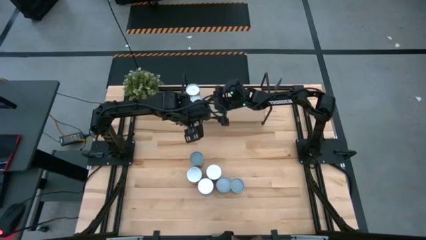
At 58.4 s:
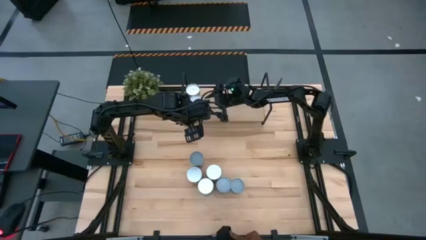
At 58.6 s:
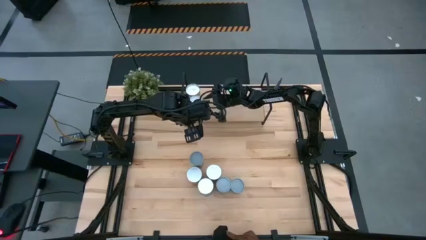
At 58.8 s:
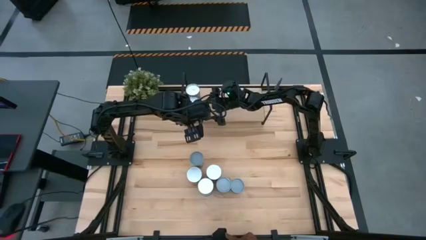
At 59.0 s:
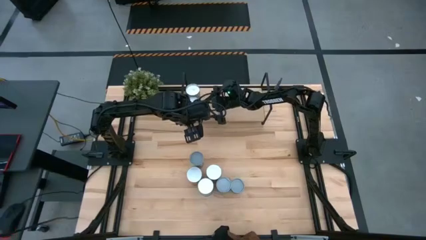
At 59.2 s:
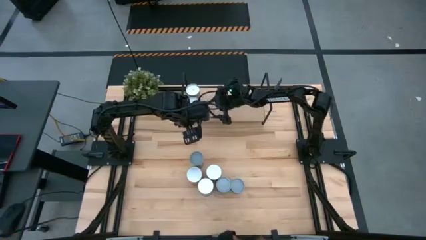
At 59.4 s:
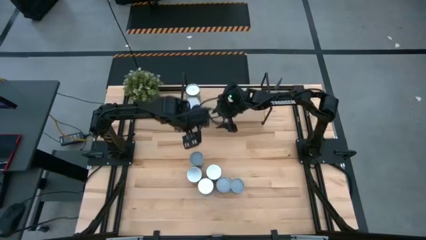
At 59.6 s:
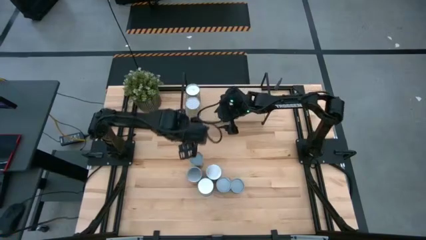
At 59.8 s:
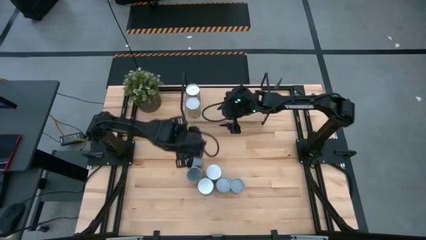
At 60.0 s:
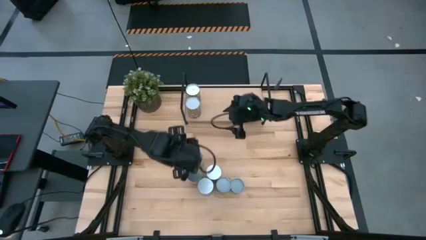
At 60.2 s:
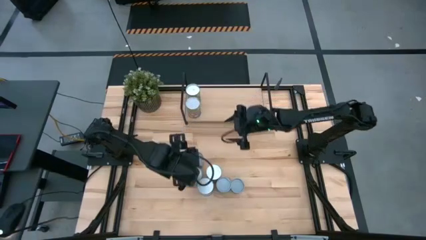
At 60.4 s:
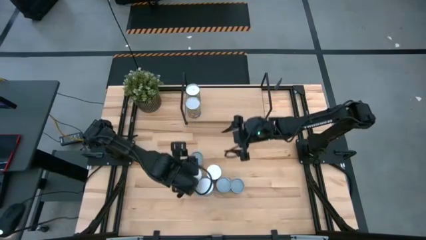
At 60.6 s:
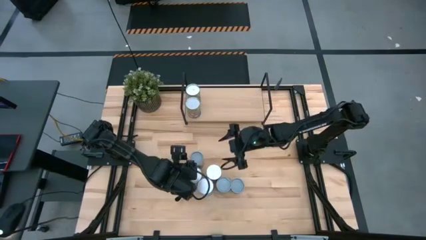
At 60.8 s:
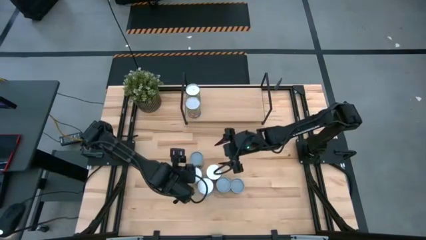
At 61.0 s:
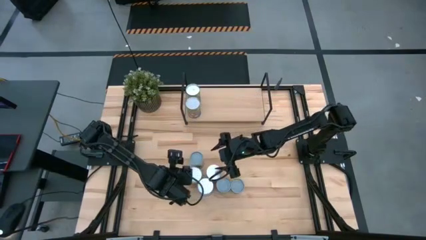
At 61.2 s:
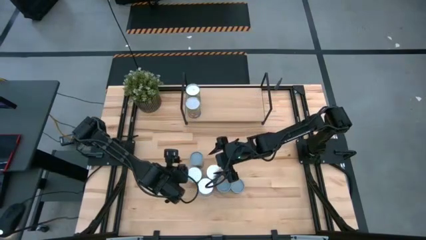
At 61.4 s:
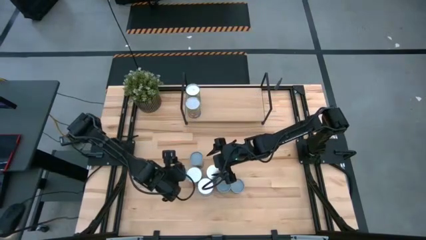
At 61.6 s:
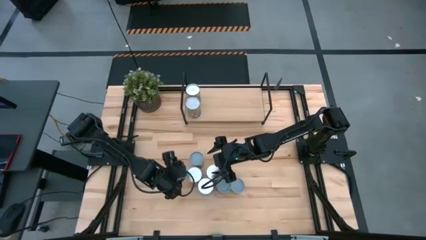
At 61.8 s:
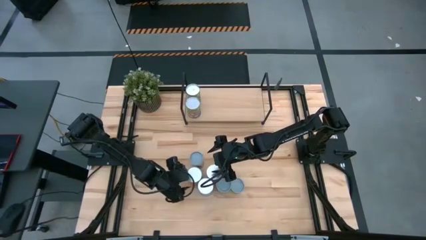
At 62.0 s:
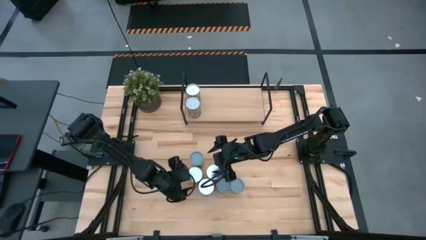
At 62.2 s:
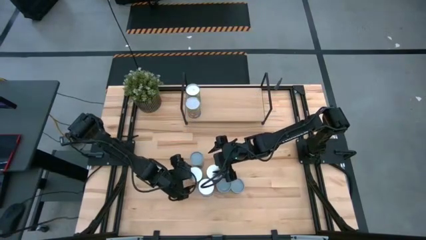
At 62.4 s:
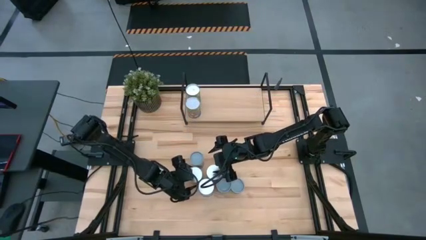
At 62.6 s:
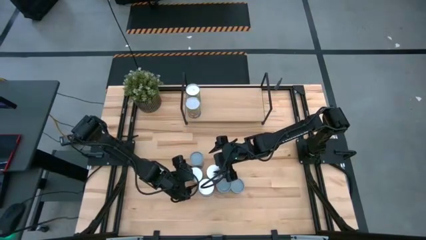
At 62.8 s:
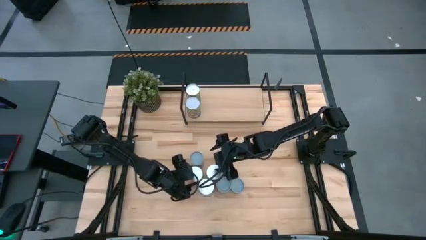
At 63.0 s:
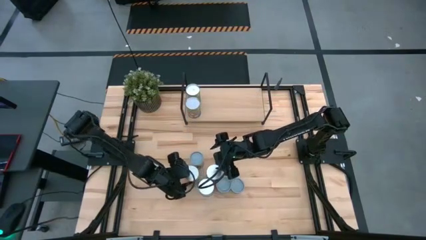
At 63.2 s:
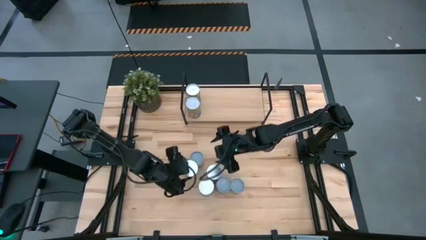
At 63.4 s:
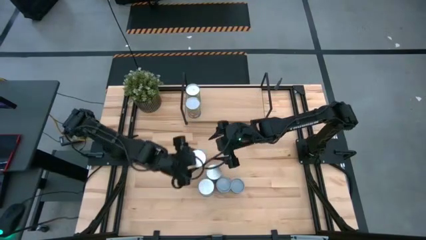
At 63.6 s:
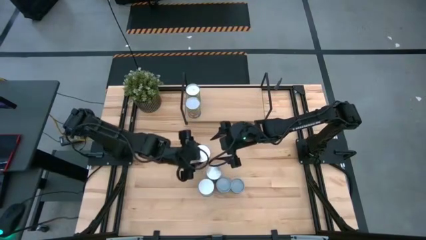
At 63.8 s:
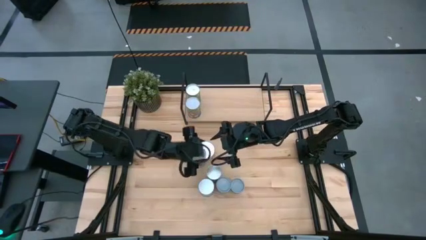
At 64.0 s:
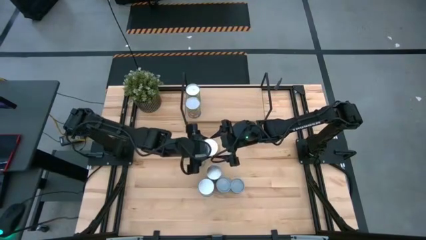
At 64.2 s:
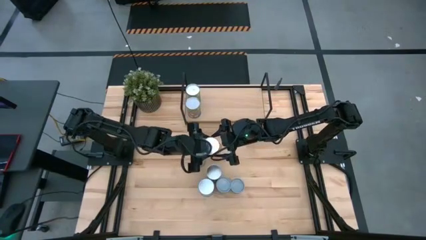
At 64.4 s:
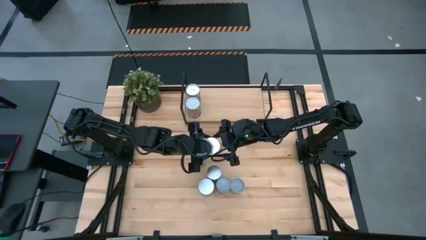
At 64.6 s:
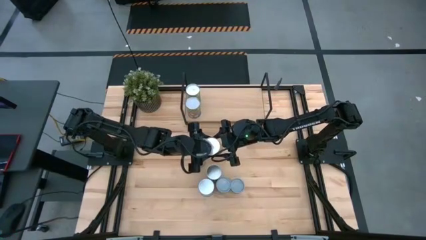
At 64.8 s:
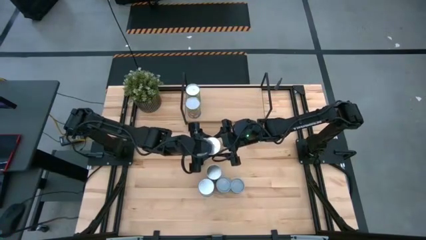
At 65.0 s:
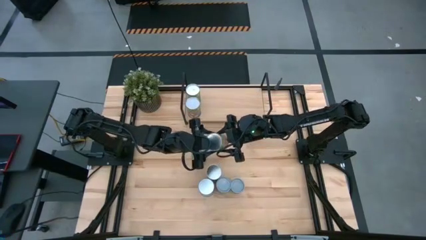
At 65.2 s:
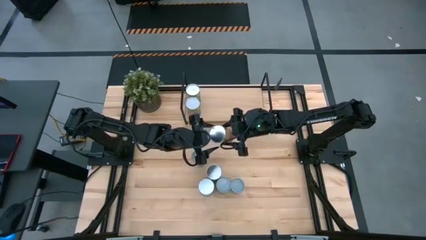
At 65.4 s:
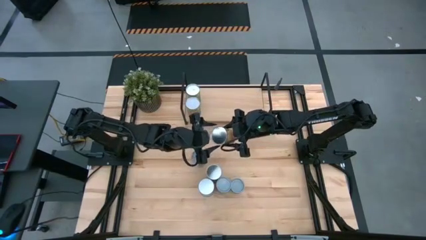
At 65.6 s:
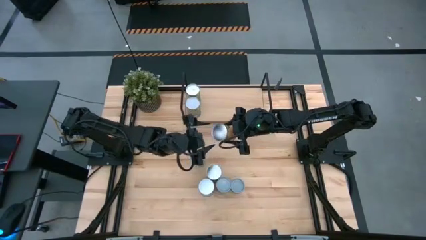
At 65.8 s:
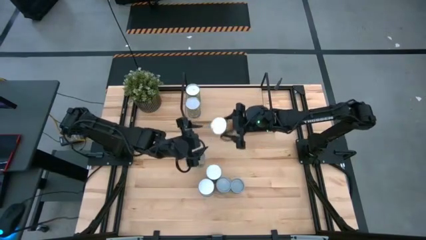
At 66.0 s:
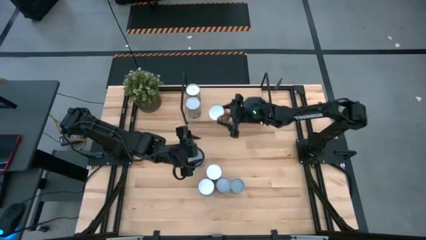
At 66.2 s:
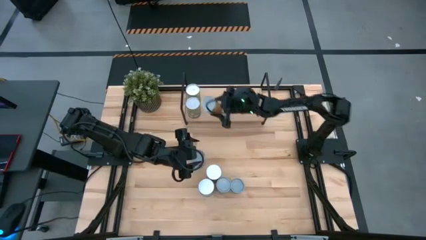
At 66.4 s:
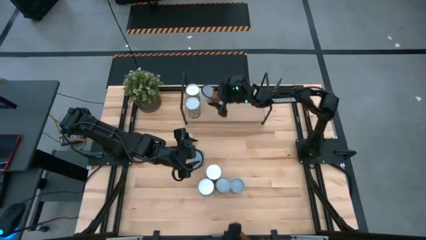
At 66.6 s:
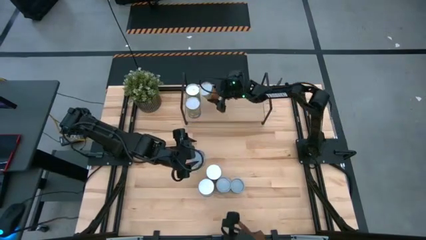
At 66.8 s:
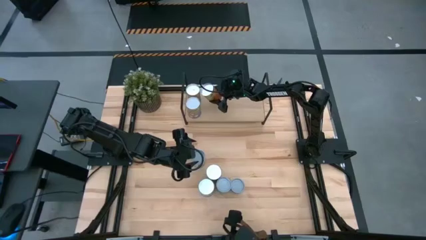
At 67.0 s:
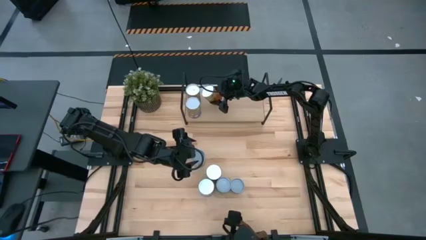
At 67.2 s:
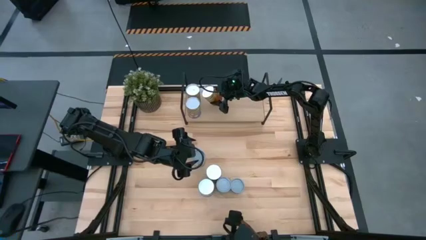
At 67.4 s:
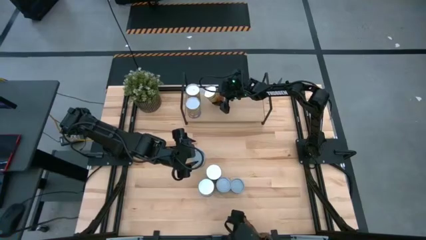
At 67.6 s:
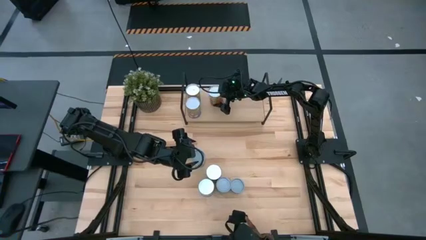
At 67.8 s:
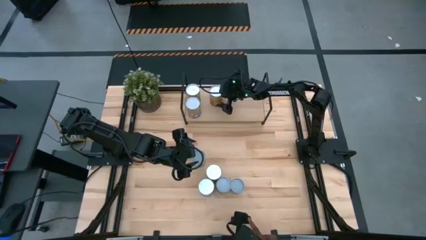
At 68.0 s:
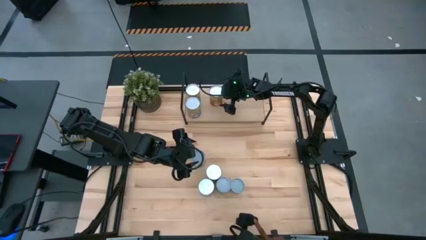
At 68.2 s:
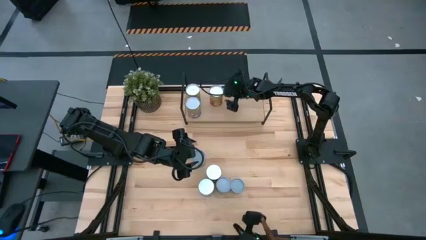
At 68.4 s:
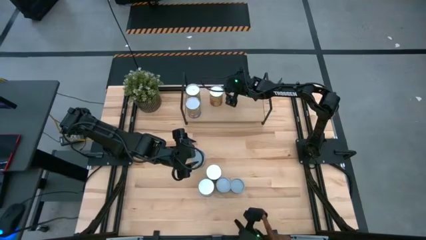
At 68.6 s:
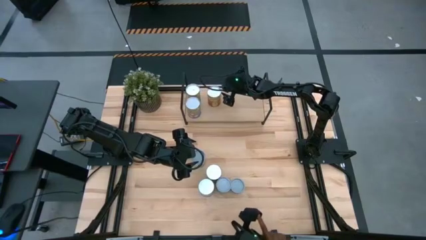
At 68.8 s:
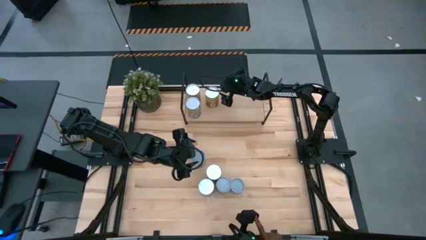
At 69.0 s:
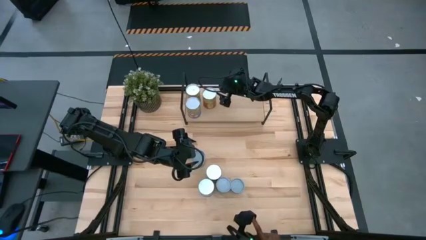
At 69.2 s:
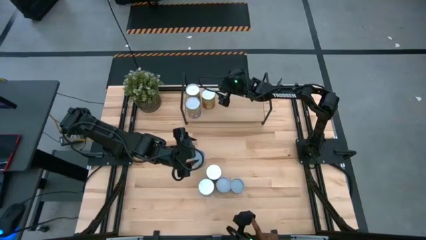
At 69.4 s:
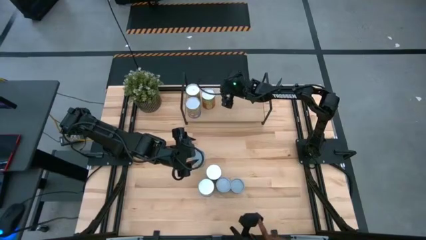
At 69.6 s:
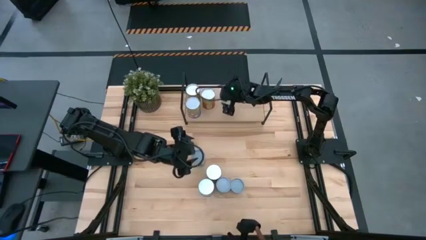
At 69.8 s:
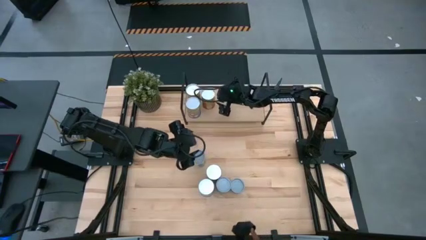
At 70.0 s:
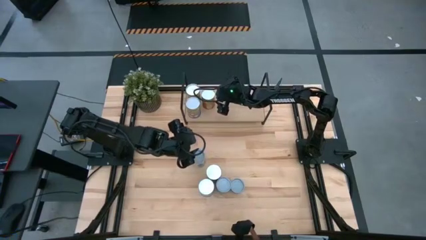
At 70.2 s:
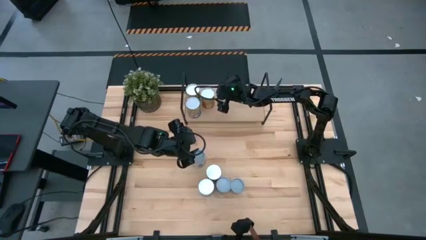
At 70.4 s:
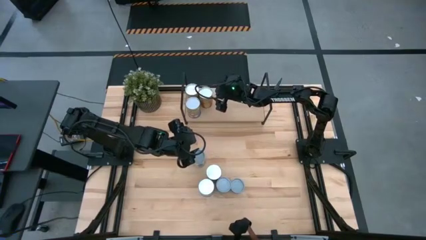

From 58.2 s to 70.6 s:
Task: Pick and place cans onto a shelf
Put the canned pineapple on the shelf

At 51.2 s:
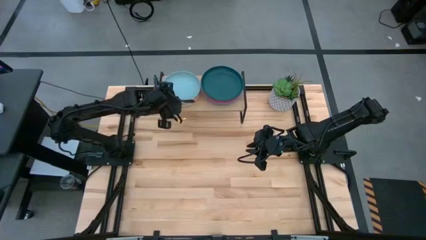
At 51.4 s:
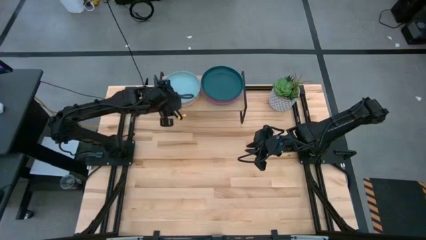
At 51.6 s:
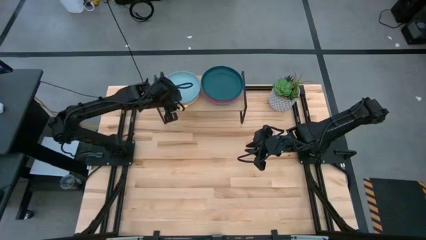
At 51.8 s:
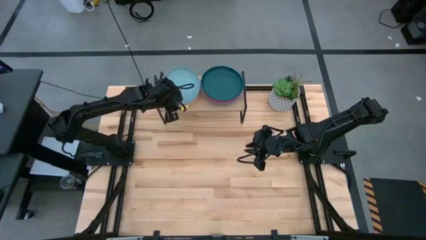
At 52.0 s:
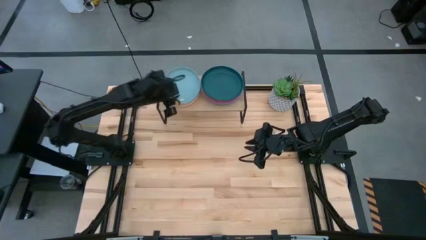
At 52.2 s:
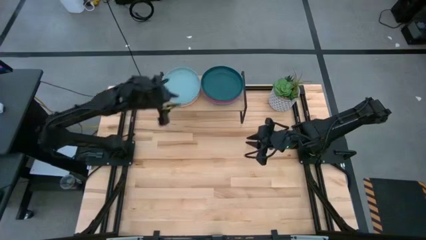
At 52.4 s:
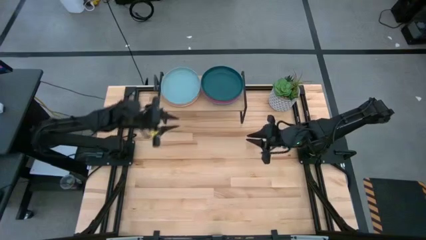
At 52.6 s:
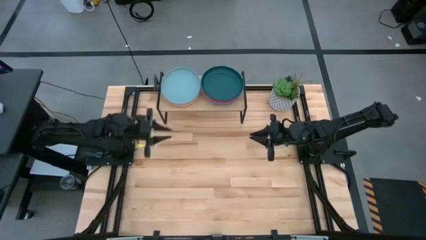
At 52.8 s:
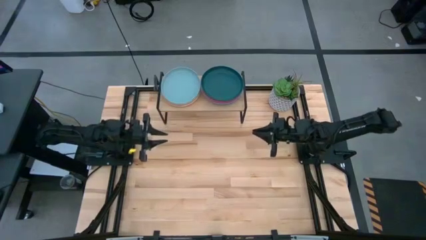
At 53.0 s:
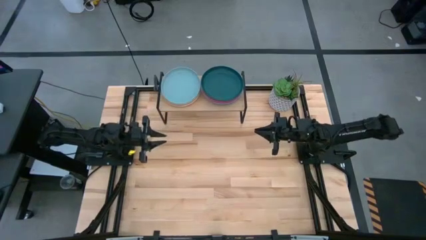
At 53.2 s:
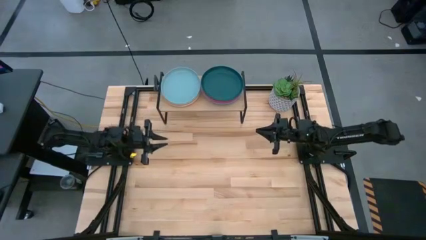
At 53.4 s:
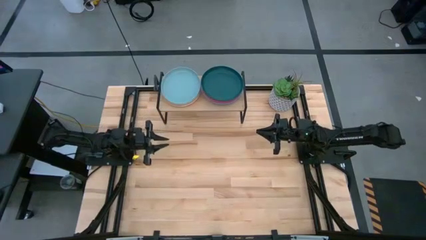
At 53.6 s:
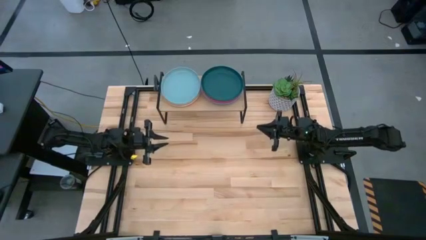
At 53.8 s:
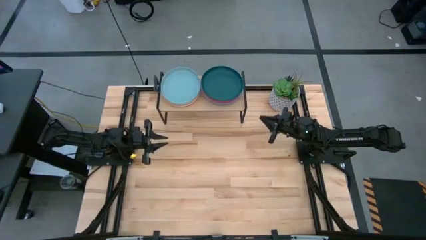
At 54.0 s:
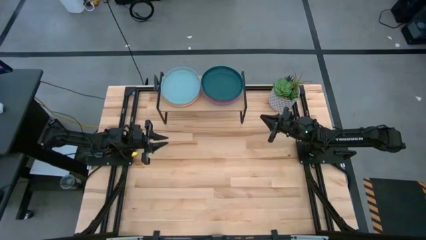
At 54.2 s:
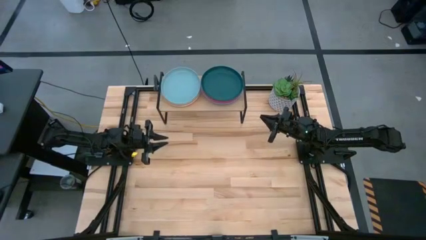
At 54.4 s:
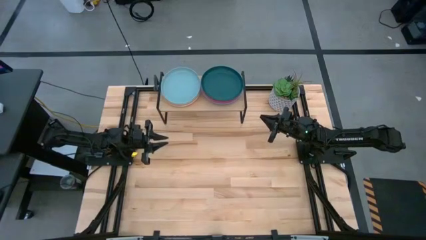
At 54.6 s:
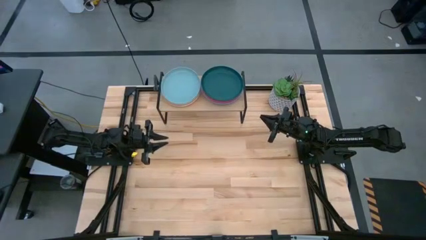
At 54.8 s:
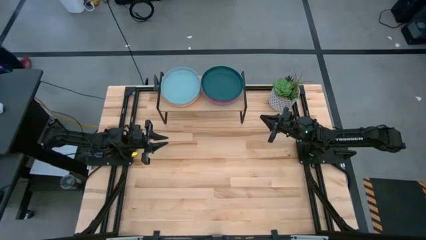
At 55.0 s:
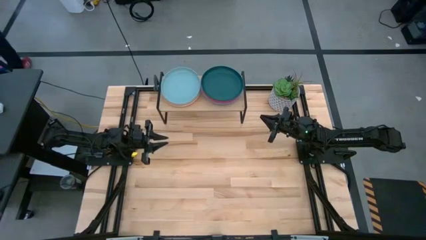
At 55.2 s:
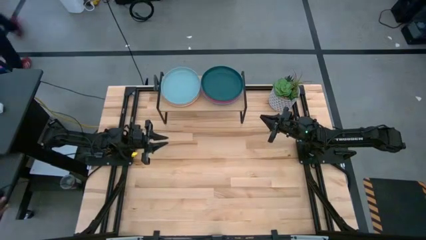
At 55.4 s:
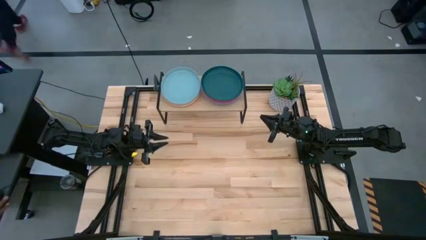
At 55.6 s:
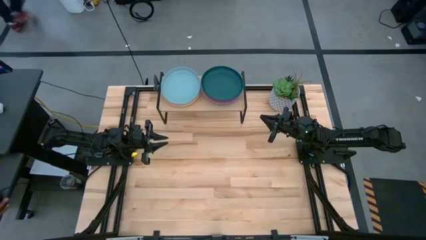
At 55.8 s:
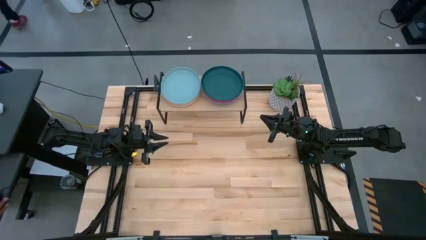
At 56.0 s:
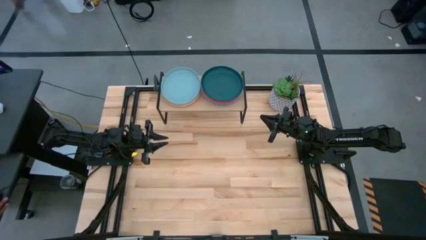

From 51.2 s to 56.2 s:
Task: Place and stack plates onto a shelf
Return to Home Position
